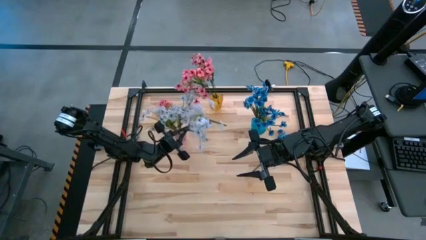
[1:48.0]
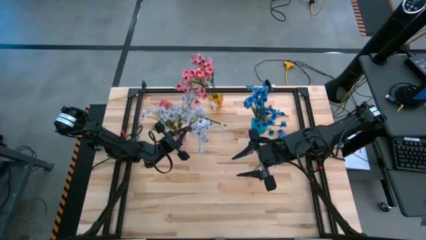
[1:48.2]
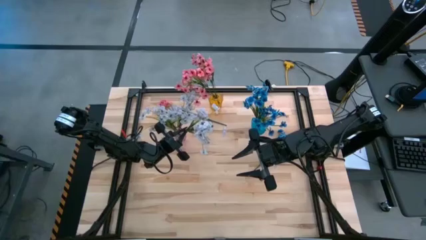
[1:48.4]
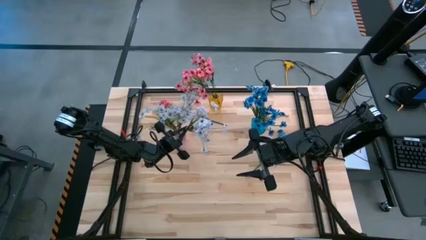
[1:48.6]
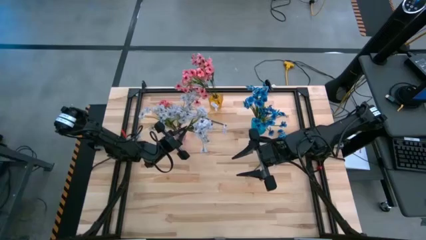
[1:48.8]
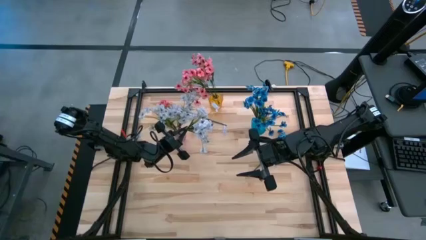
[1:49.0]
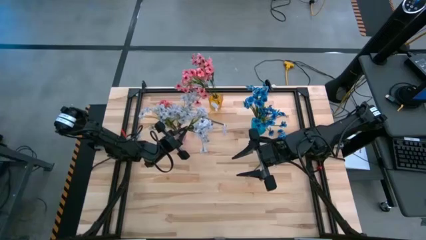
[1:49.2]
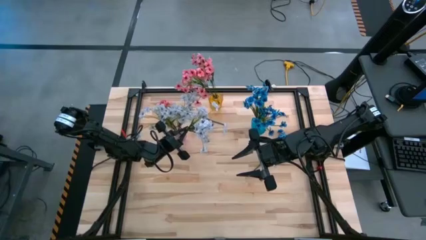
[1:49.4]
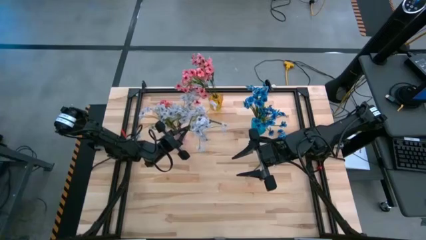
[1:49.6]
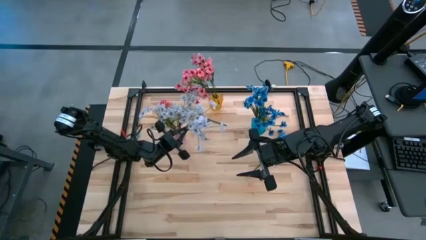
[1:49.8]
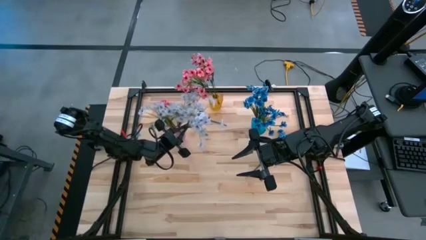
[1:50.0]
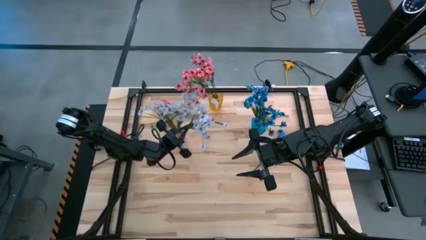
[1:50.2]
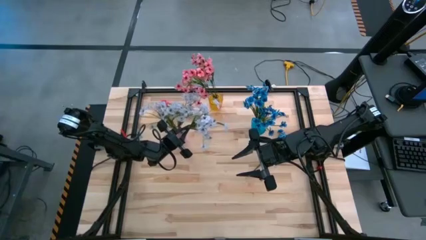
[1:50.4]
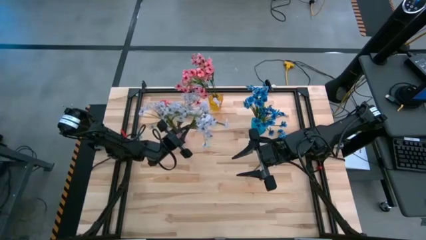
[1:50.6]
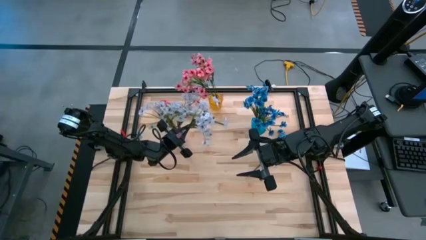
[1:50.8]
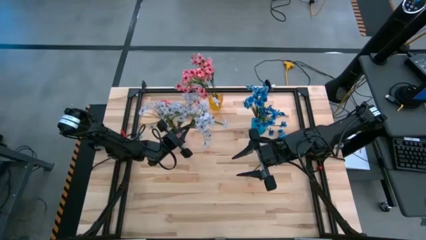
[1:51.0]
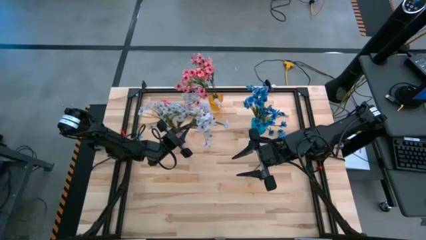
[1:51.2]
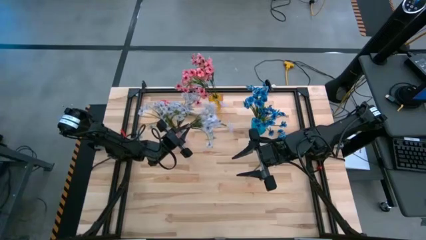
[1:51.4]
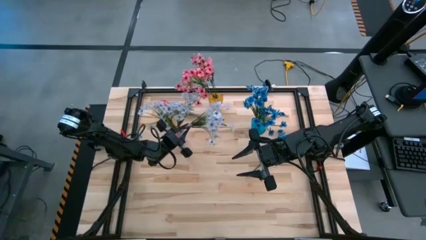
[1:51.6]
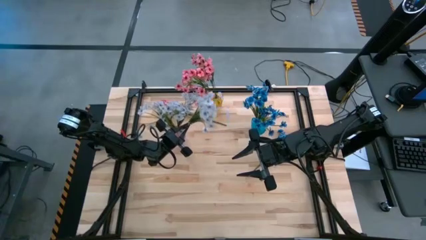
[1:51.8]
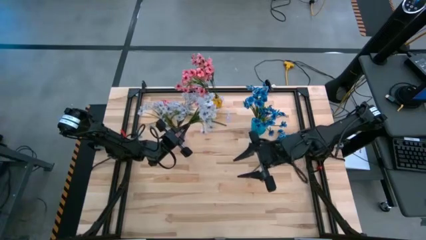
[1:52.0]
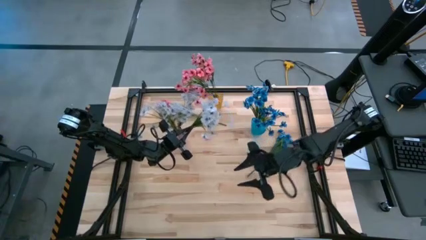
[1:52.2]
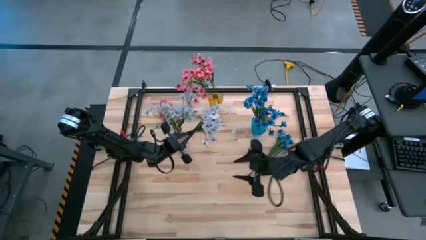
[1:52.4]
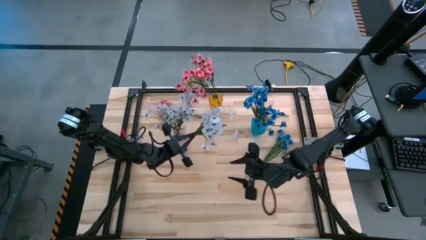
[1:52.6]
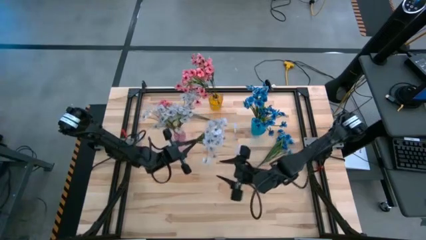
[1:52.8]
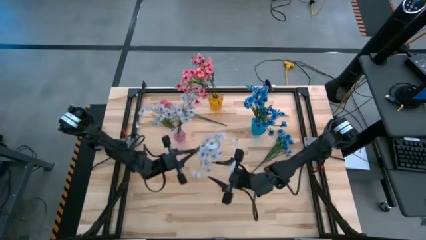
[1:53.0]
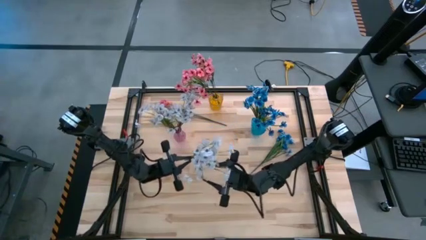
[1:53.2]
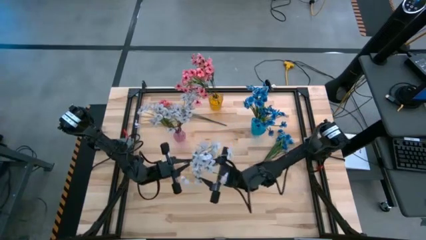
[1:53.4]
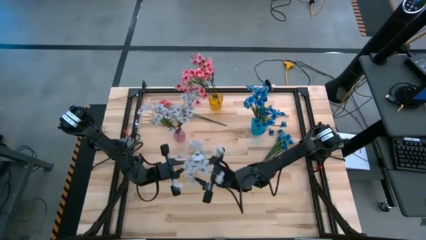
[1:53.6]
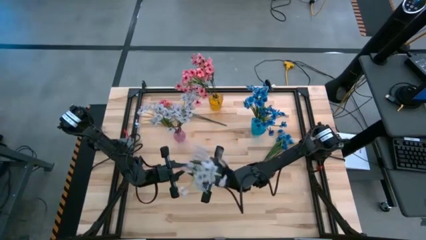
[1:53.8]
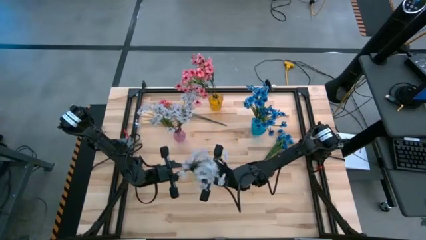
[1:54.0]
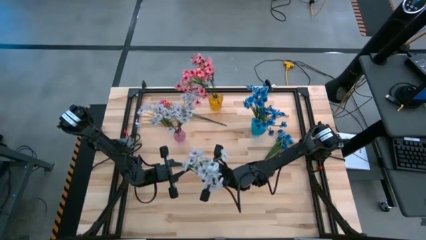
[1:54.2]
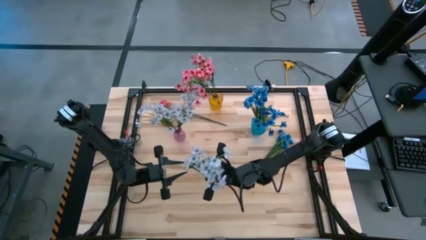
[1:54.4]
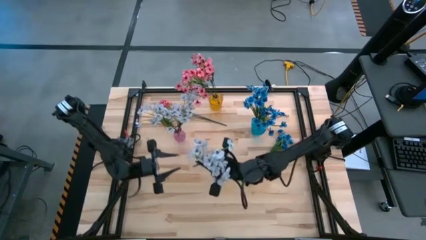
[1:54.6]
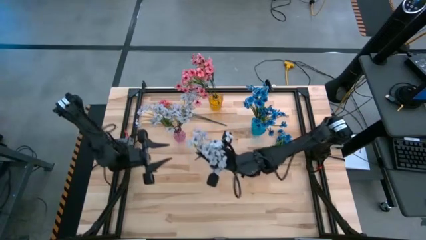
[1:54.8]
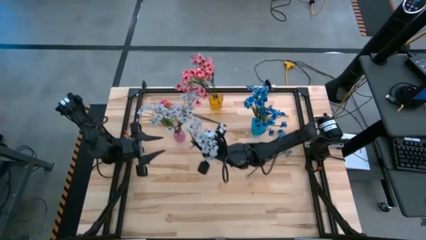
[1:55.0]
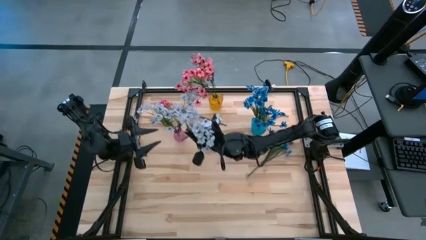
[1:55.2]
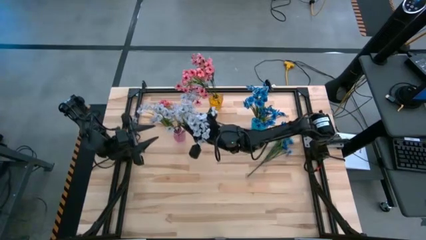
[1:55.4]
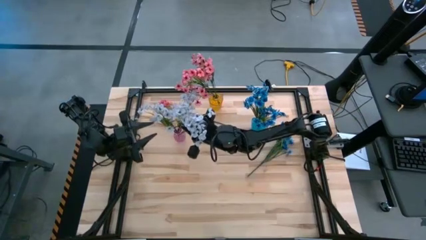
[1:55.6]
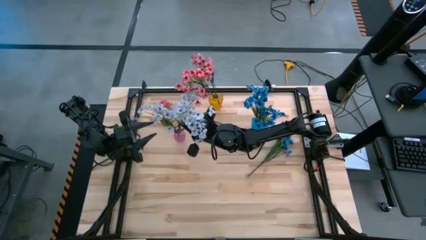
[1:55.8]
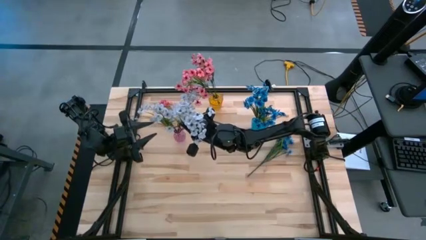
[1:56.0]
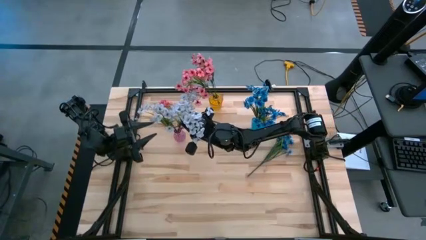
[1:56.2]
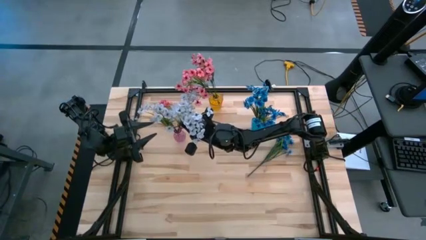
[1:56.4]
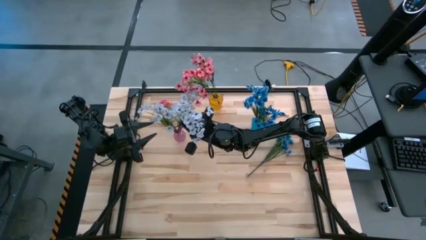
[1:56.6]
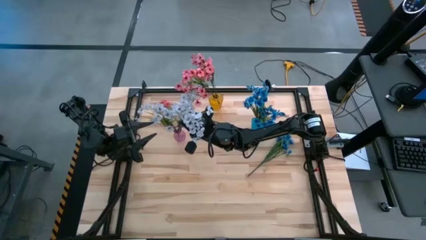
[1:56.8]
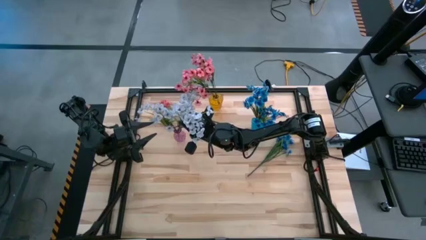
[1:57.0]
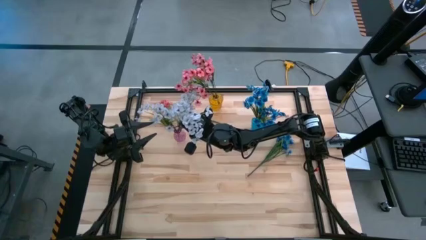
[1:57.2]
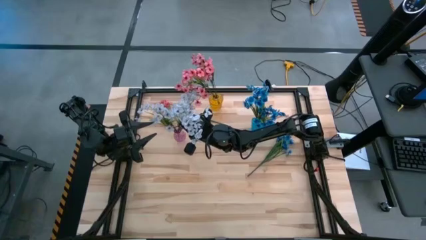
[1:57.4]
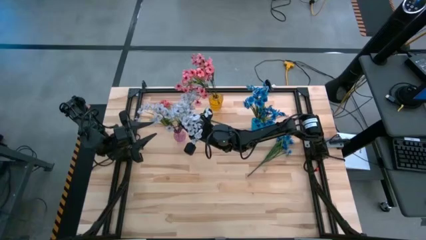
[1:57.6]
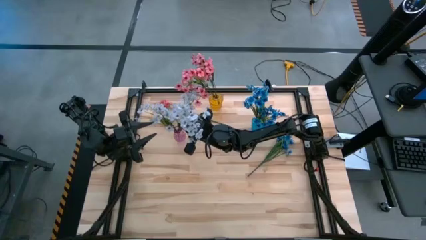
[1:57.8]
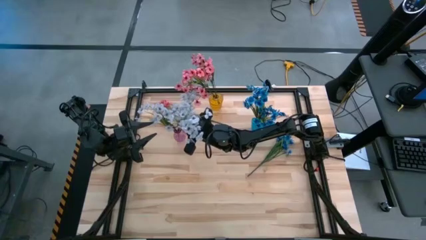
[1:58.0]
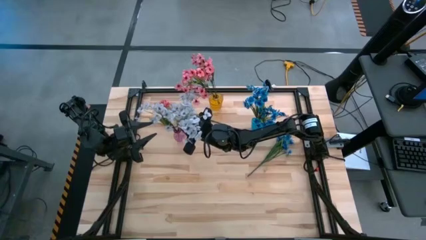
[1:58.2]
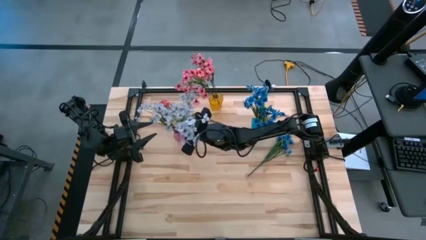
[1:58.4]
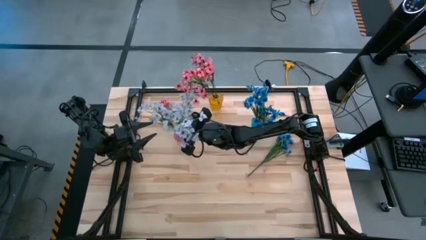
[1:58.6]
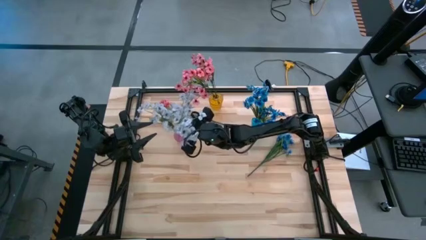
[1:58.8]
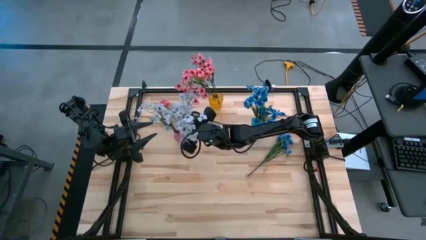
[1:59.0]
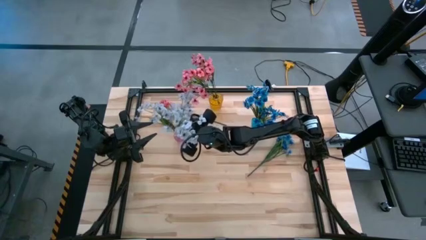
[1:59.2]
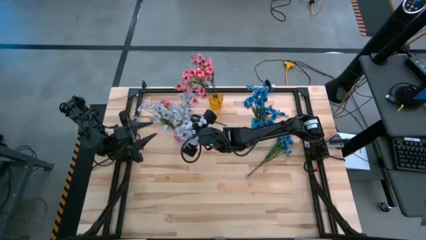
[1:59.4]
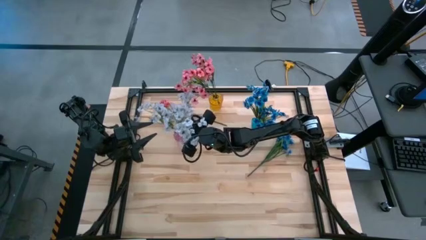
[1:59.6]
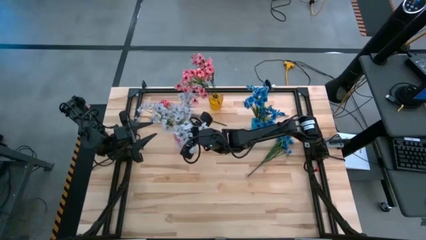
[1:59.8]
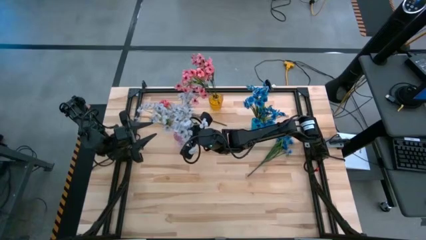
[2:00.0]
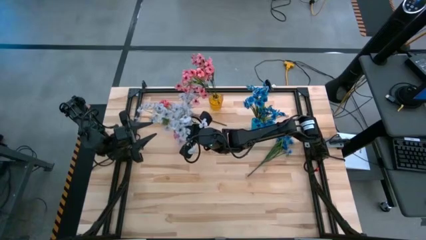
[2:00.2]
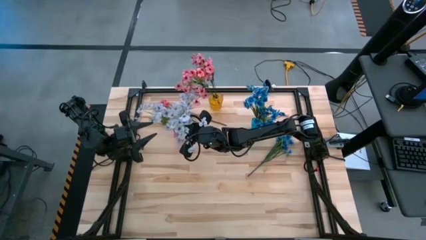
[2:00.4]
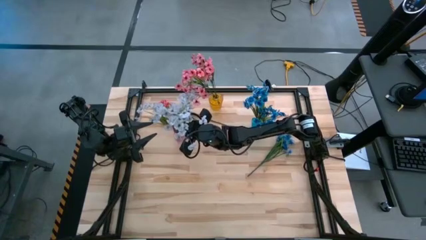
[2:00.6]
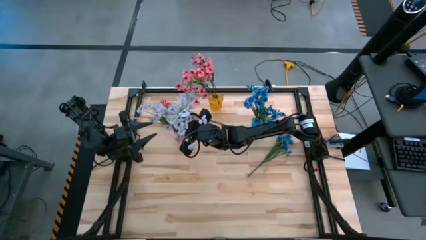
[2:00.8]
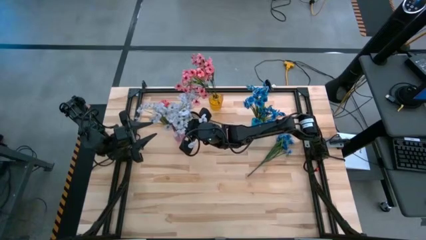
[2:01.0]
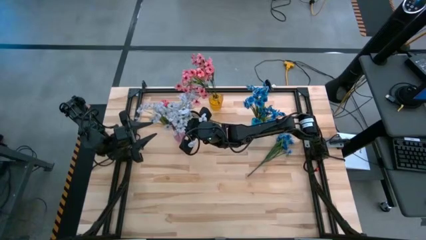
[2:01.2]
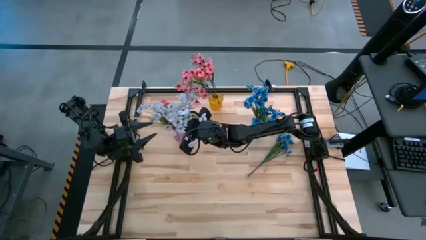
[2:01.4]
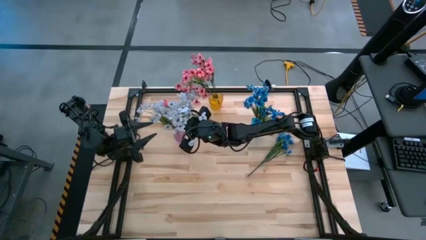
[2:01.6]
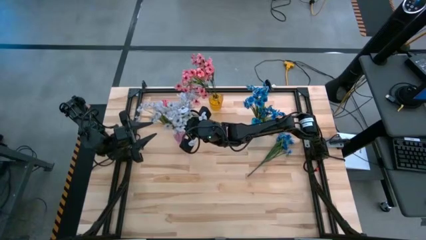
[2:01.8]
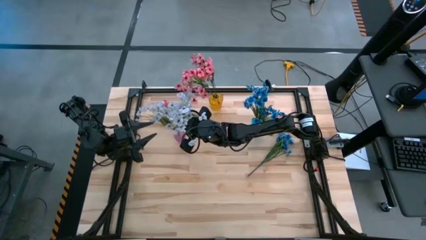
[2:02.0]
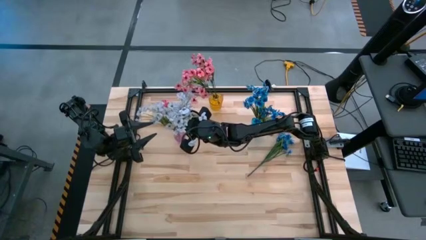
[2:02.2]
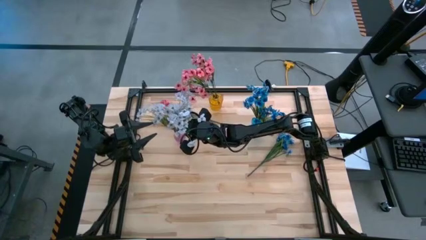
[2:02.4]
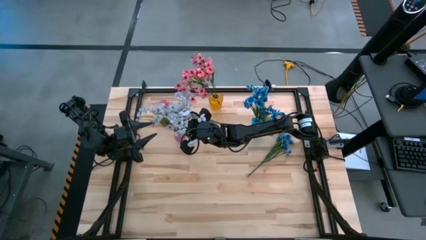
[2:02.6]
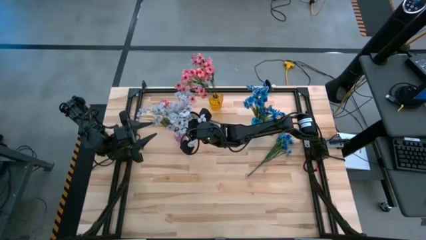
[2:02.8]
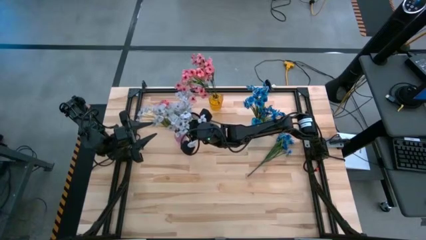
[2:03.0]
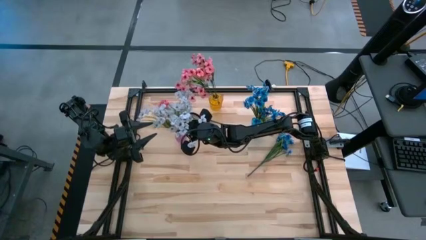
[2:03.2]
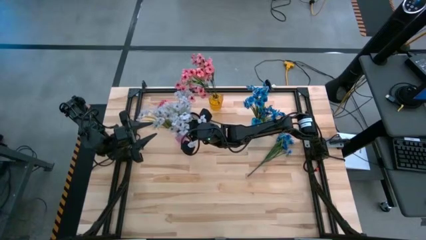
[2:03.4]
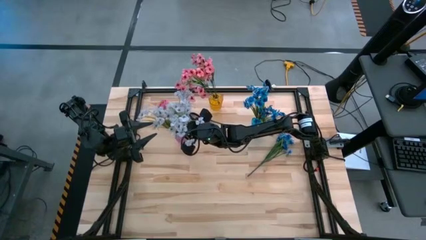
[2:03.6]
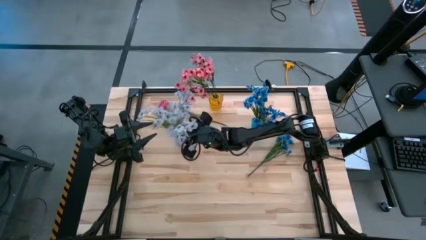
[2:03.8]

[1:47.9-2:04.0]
Task: Sort flowers into vase by color
Put the white flowers into the purple vase
